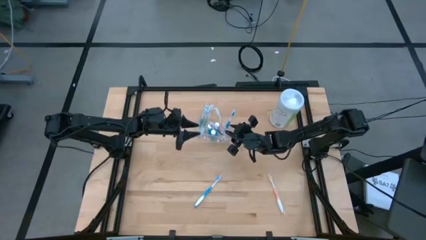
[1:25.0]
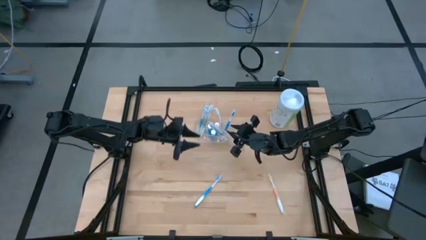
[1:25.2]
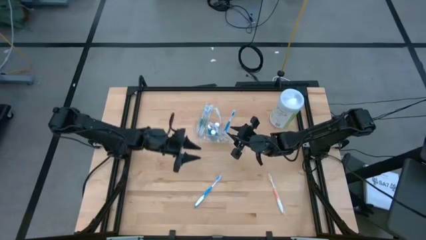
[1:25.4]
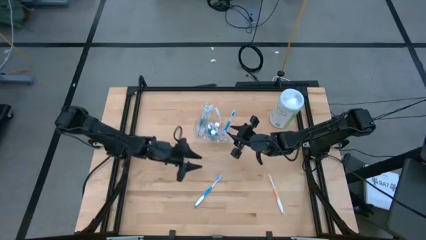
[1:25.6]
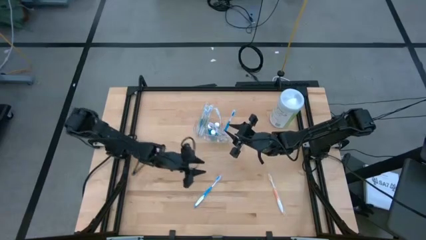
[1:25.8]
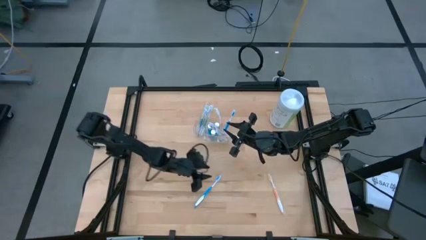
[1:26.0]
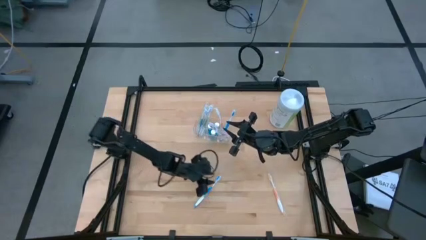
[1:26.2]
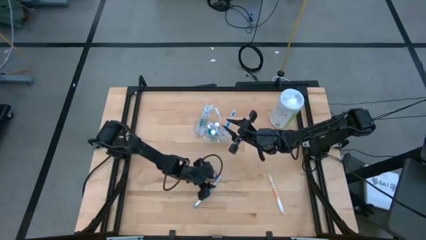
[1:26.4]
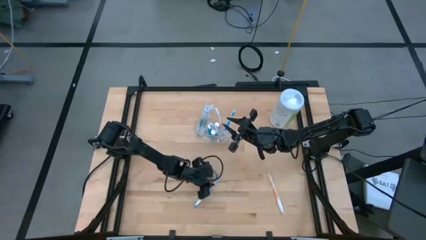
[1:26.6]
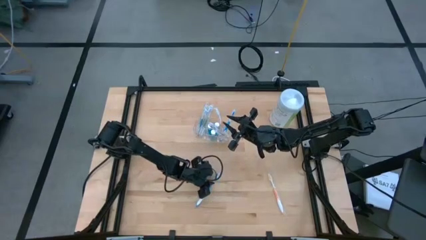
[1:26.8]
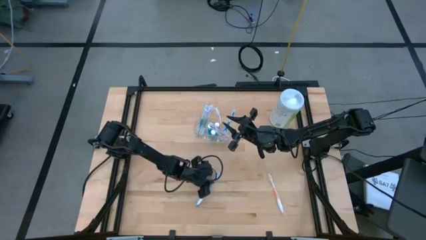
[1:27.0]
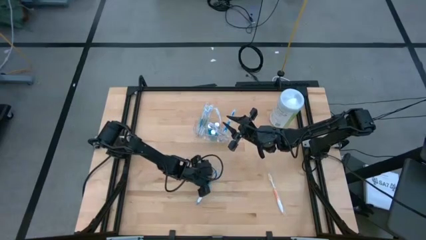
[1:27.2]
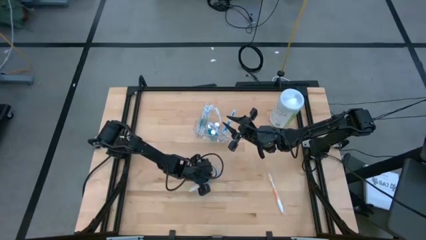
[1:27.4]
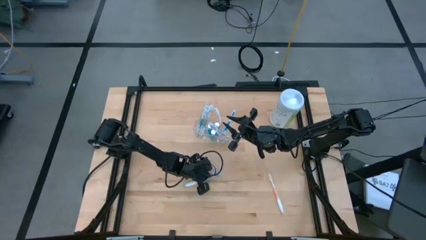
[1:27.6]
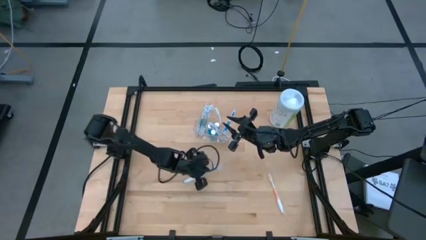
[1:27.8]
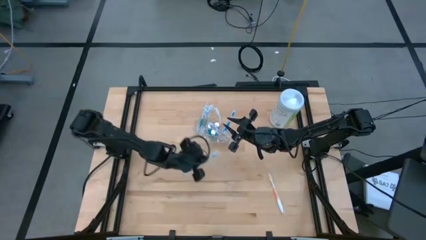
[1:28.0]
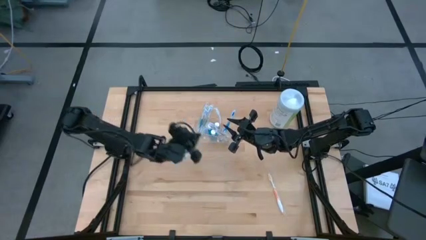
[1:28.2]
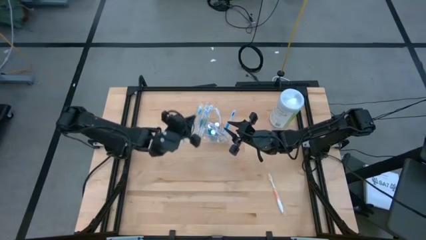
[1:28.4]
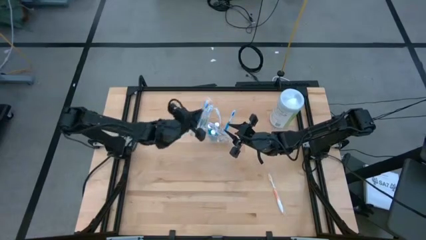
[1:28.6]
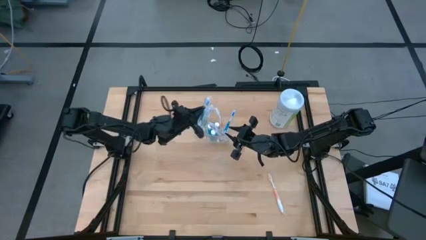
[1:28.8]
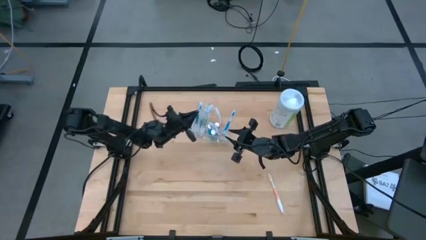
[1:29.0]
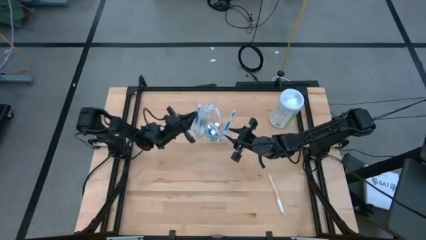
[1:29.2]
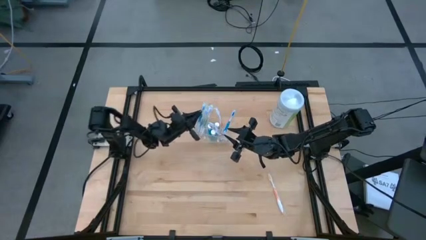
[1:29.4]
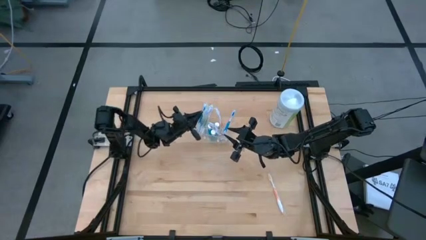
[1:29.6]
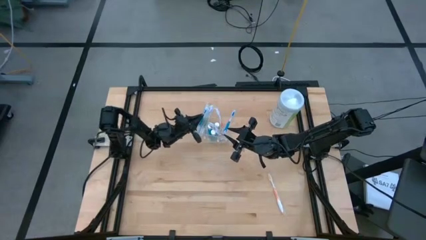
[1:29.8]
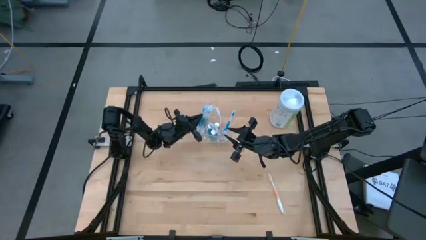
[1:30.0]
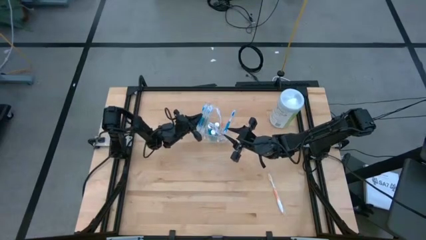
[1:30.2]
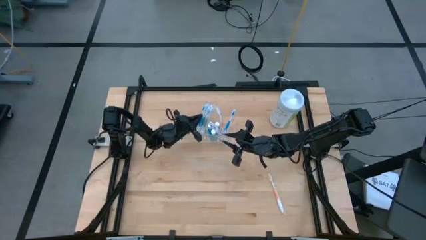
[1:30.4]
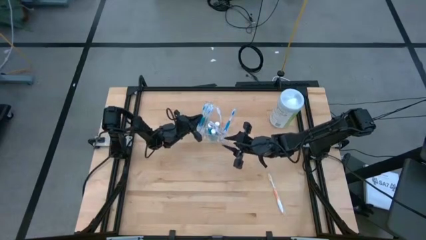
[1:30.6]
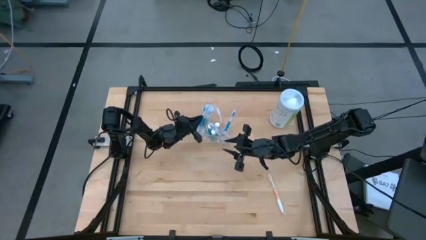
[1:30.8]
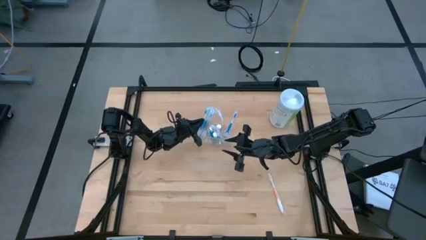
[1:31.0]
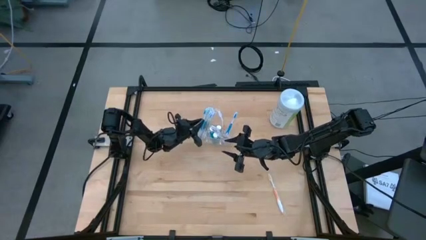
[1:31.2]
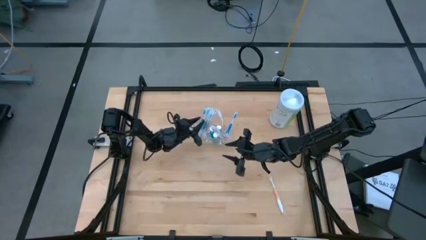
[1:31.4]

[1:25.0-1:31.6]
Task: Pick & Place toothbrushing station
Put the blue toothbrush into the left section of the transparent organizer

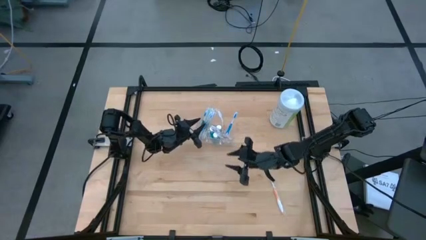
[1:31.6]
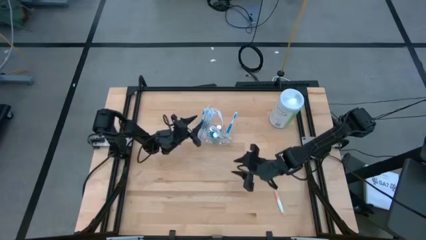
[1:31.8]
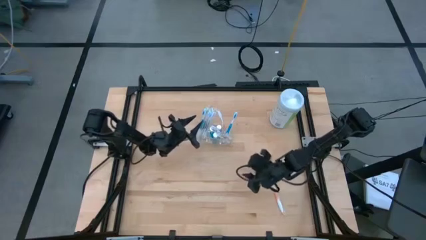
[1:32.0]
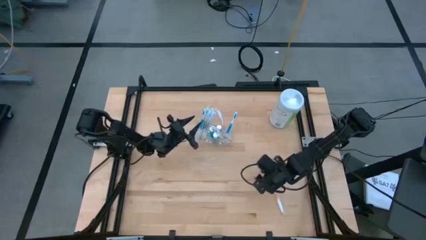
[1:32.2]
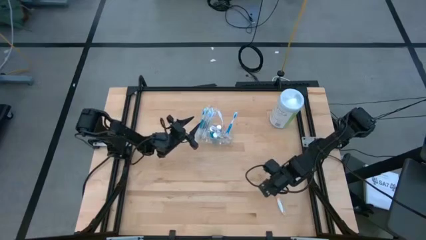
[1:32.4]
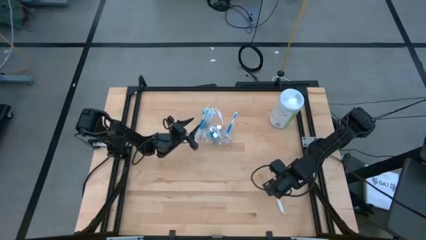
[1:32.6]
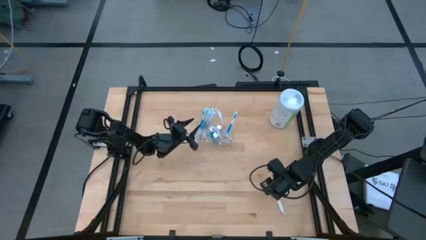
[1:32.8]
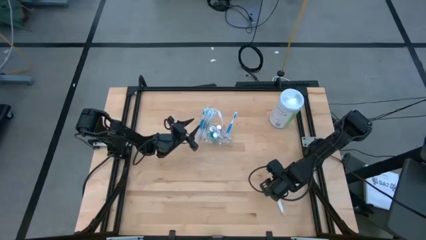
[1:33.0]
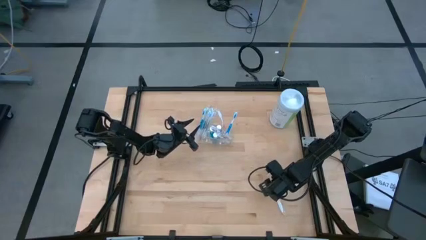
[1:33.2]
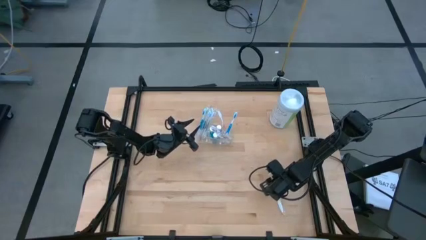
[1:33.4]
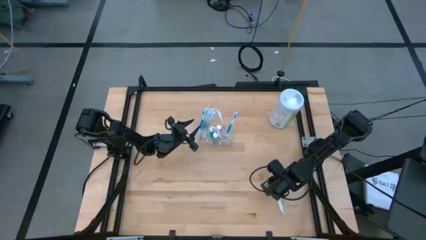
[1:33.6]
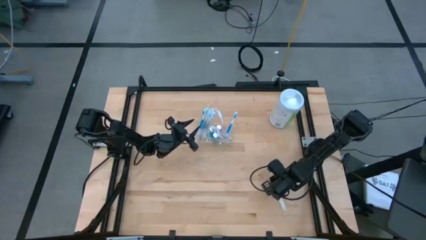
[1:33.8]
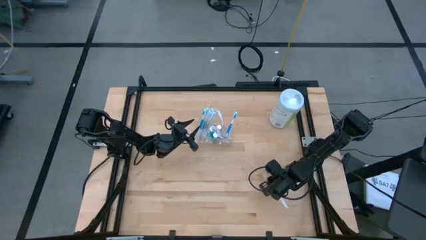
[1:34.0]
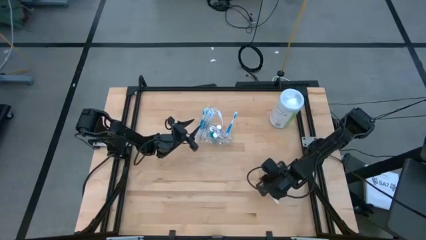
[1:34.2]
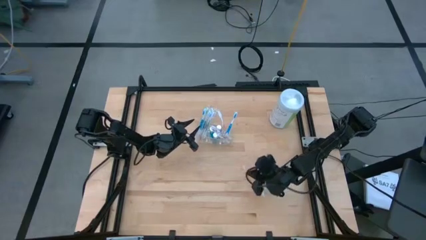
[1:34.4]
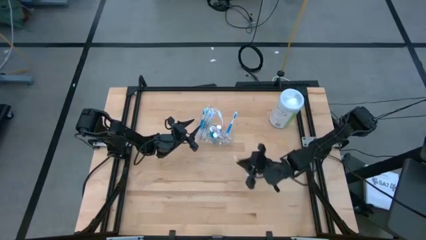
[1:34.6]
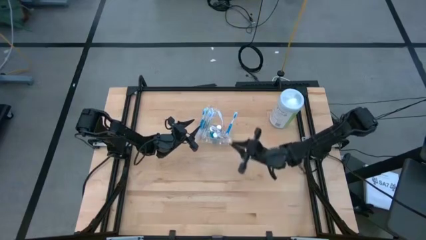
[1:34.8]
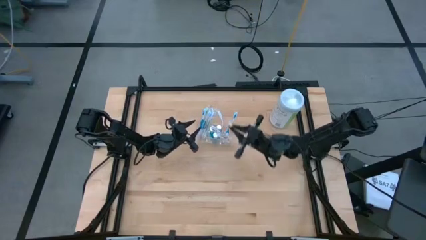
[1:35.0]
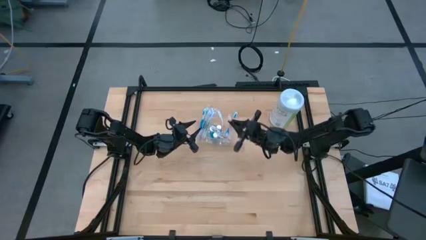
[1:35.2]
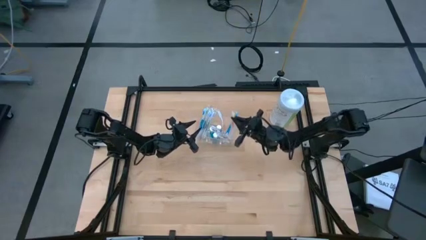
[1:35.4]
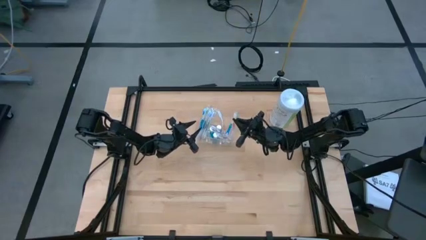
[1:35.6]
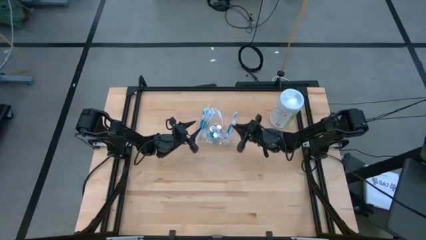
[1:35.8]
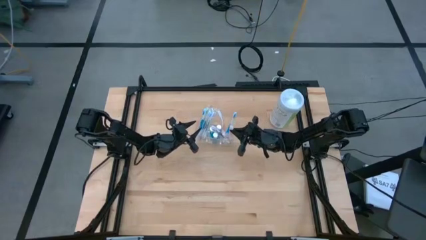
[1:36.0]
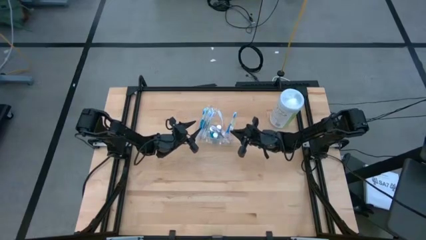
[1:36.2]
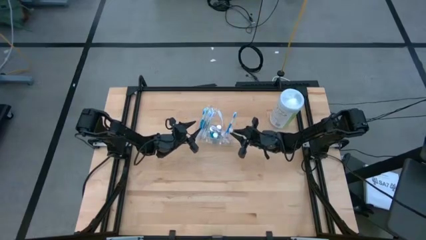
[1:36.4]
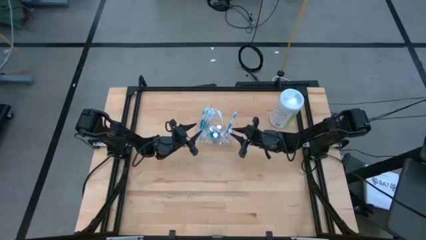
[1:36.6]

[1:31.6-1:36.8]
Put the orange toothbrush into the right section of the transparent organizer

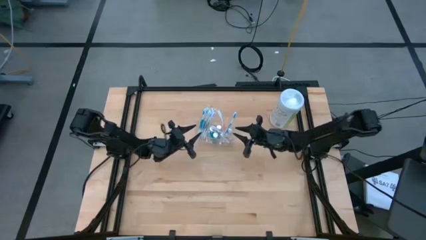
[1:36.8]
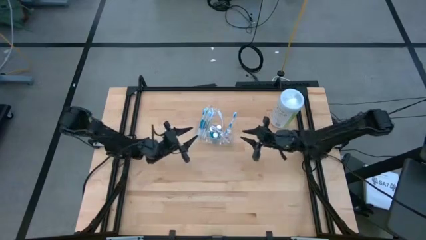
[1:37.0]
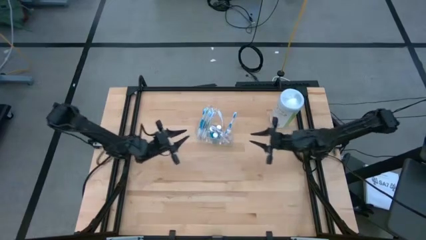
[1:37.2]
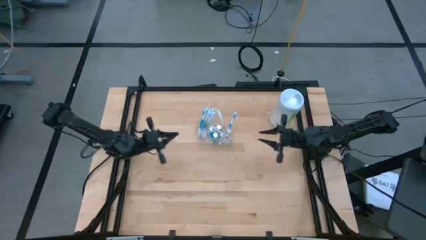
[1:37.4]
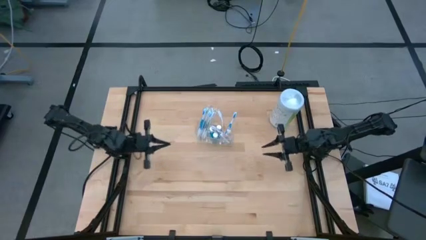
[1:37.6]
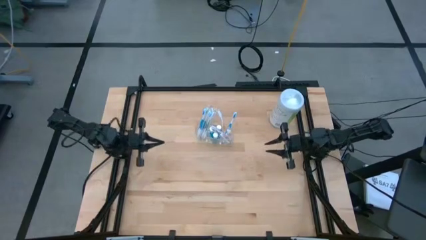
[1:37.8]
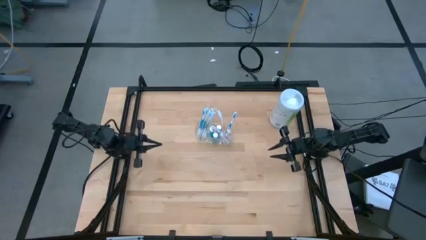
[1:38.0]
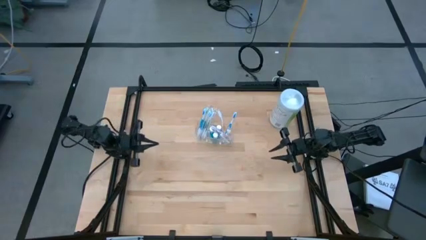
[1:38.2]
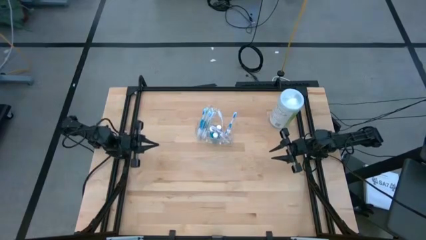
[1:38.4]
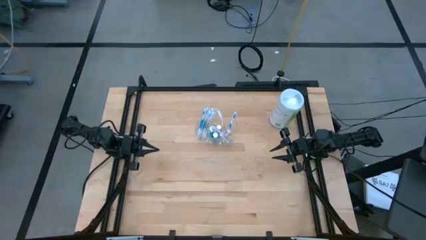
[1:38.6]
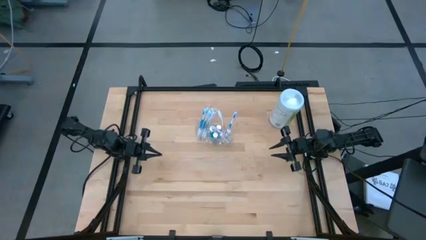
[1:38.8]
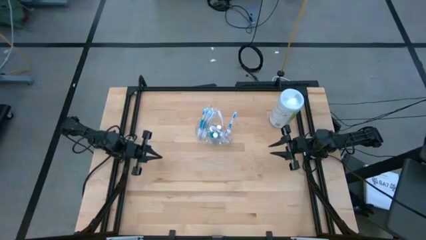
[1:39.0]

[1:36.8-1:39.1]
Return to Home Position

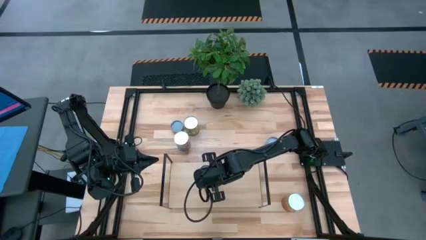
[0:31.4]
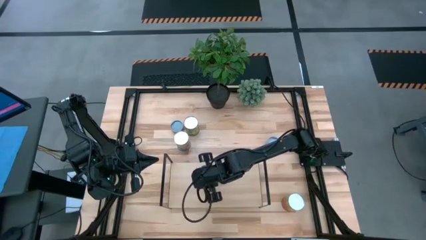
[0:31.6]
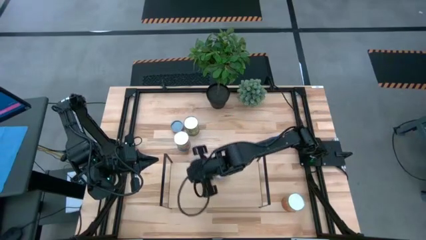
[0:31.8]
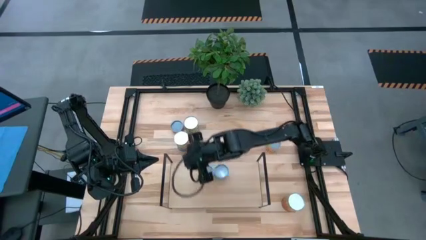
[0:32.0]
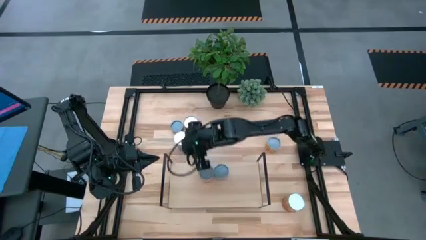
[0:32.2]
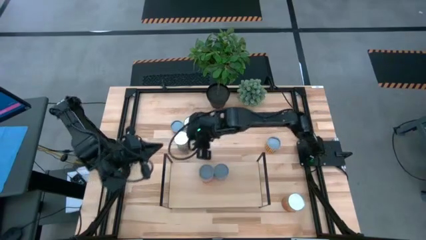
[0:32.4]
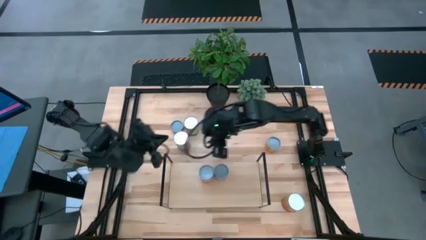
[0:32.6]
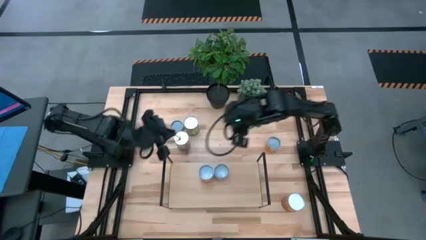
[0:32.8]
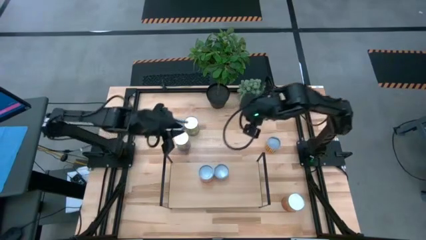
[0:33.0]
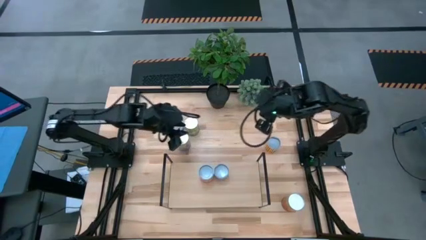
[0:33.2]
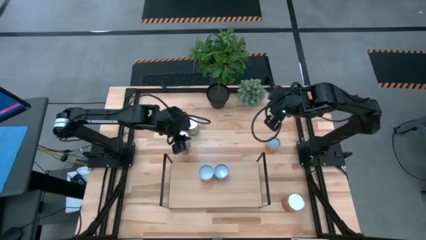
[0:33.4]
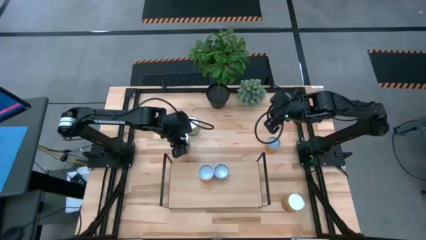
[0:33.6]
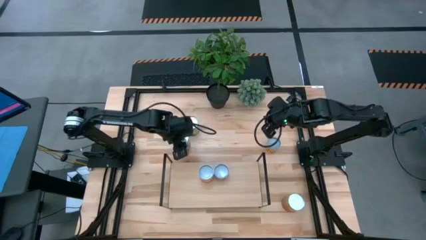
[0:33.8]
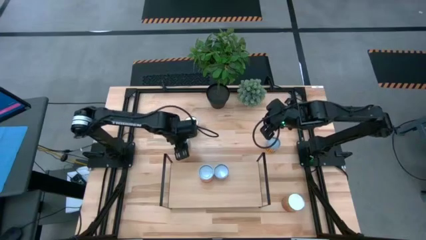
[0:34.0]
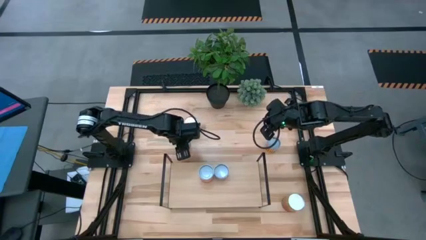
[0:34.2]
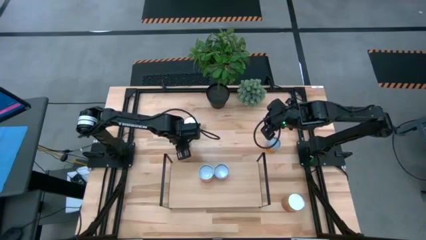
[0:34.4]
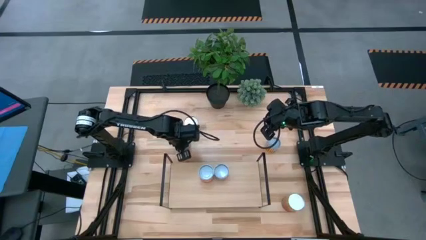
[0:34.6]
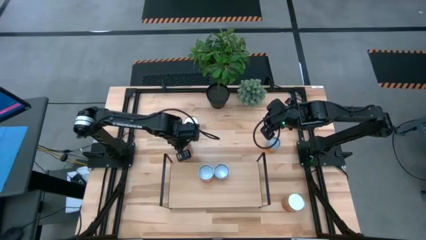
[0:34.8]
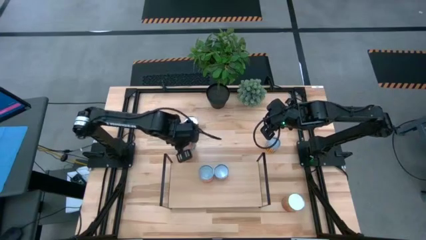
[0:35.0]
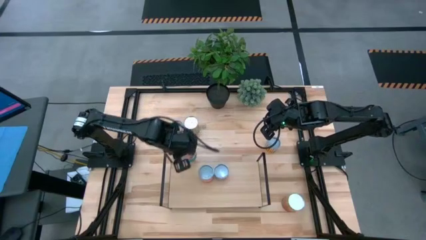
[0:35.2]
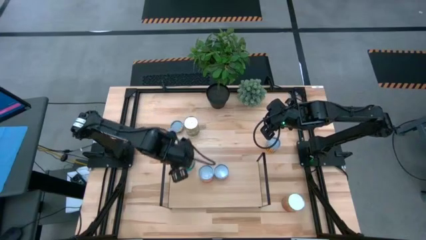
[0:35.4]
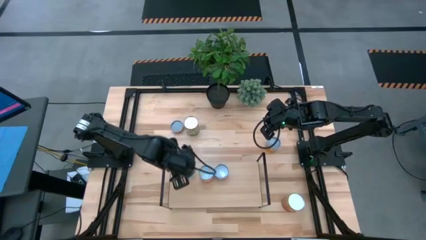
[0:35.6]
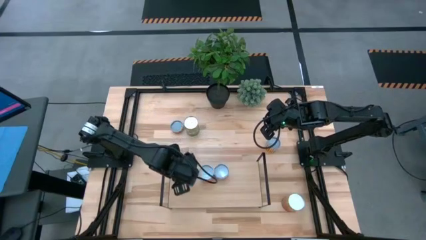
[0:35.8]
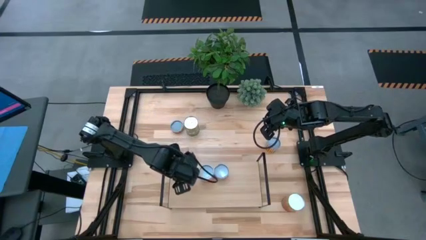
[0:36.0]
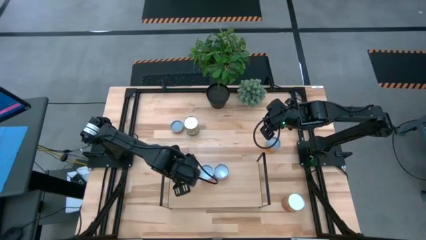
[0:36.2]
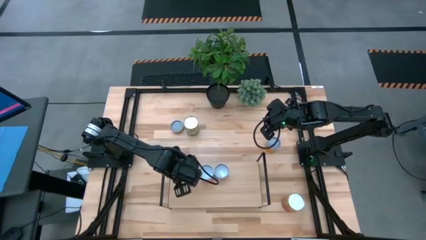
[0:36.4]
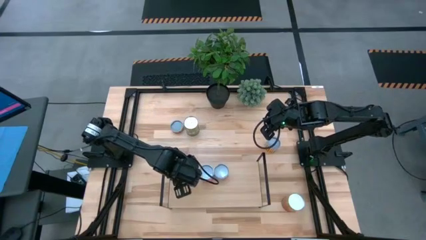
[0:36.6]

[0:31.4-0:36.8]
Task: Pick and place cans onto a shelf
Put the blue tomato can on the shelf
